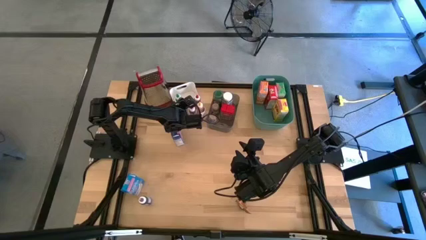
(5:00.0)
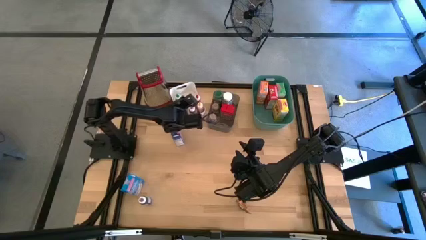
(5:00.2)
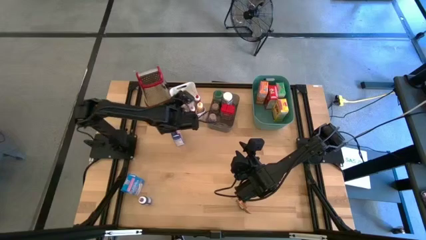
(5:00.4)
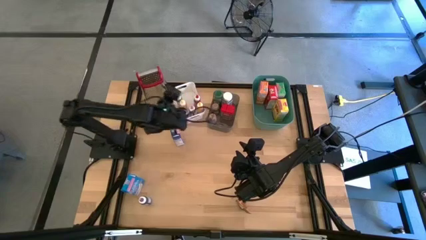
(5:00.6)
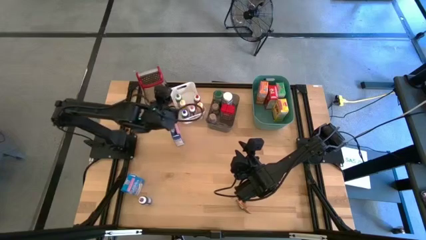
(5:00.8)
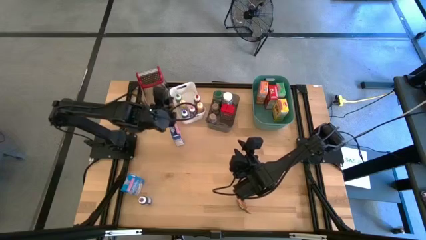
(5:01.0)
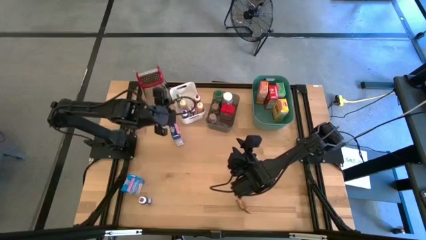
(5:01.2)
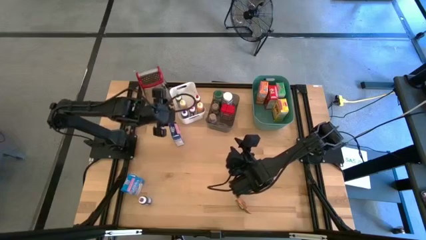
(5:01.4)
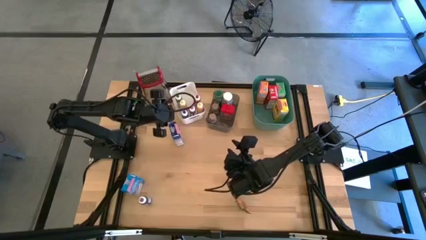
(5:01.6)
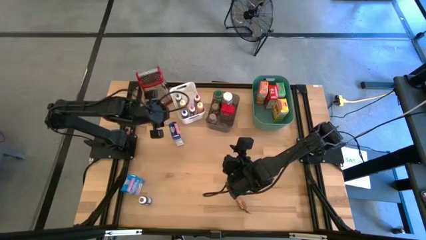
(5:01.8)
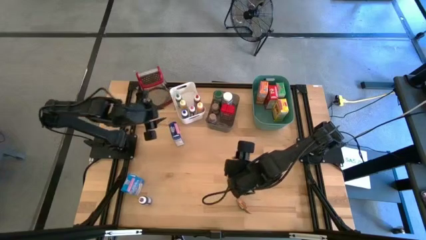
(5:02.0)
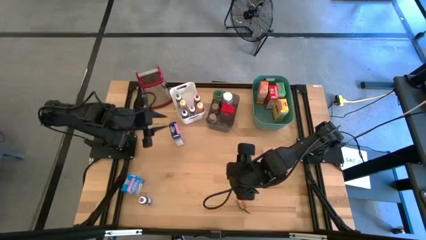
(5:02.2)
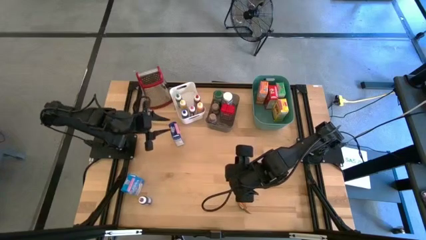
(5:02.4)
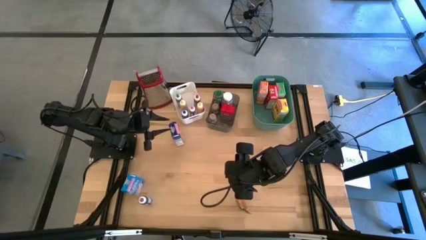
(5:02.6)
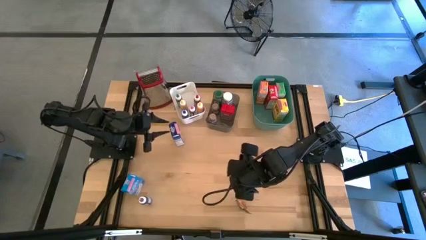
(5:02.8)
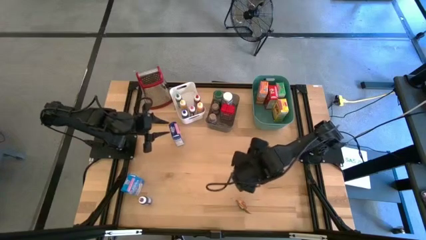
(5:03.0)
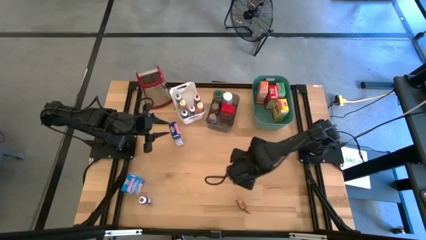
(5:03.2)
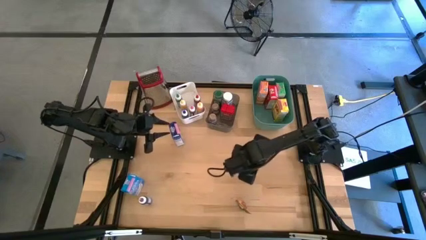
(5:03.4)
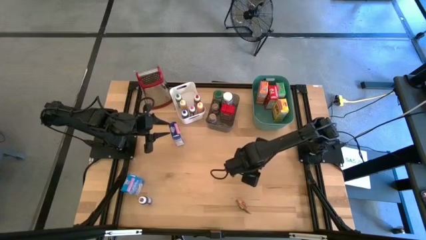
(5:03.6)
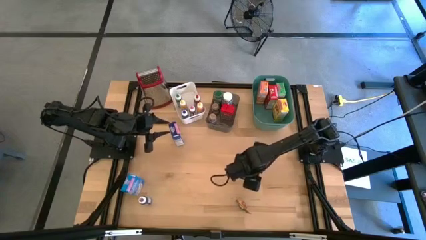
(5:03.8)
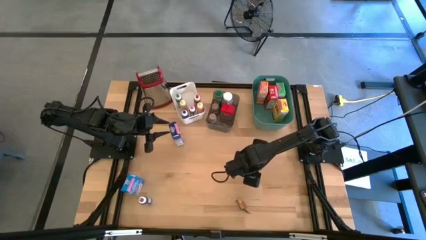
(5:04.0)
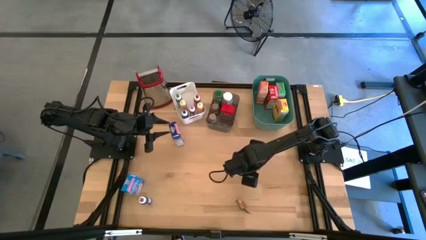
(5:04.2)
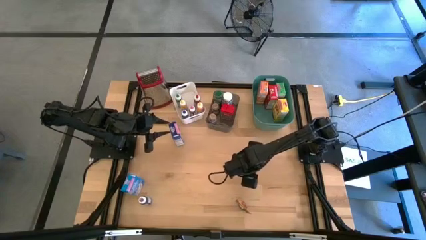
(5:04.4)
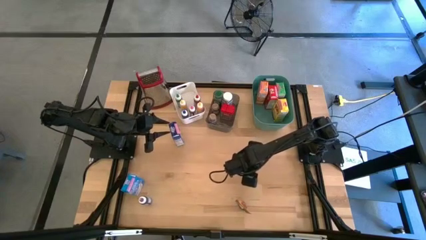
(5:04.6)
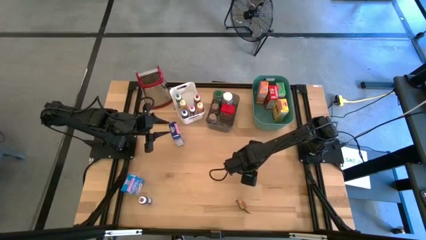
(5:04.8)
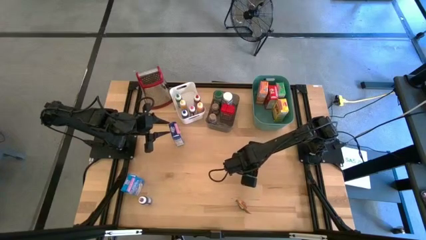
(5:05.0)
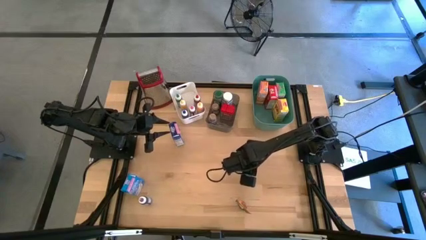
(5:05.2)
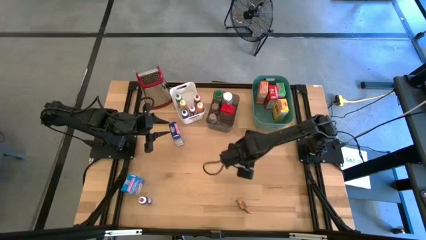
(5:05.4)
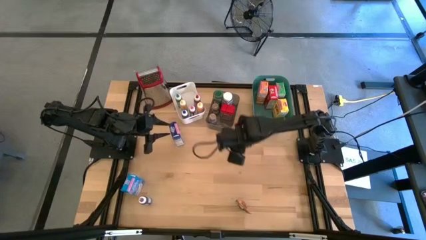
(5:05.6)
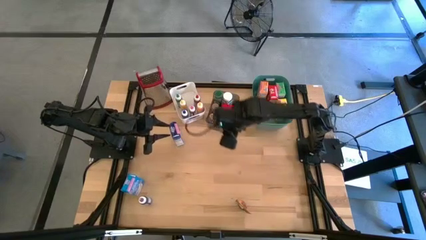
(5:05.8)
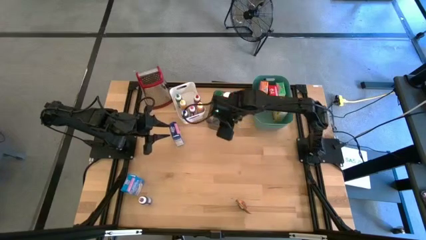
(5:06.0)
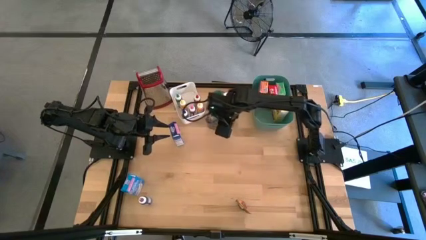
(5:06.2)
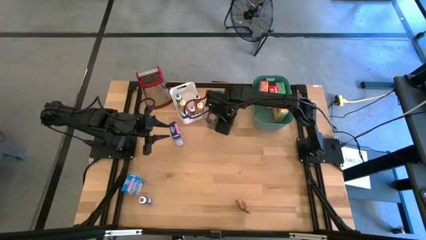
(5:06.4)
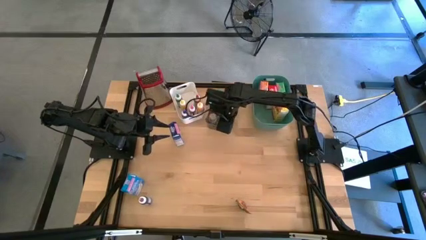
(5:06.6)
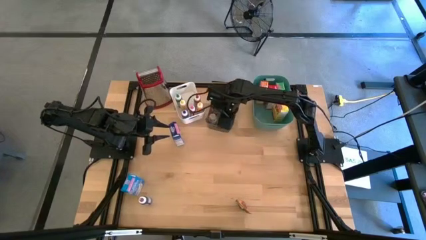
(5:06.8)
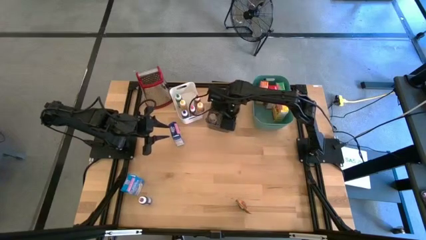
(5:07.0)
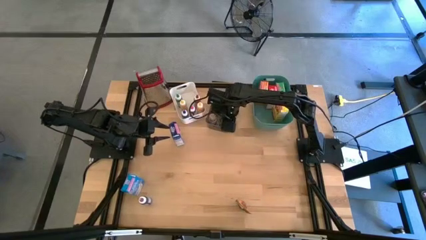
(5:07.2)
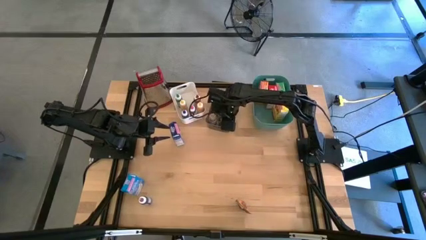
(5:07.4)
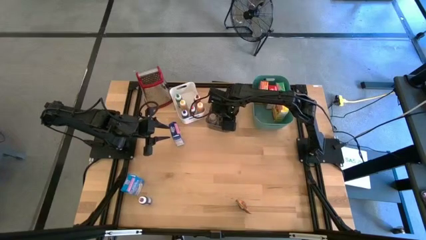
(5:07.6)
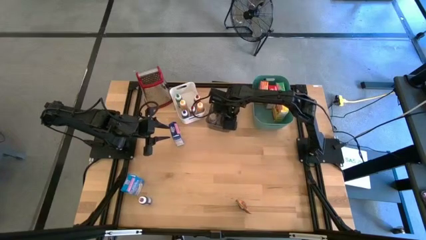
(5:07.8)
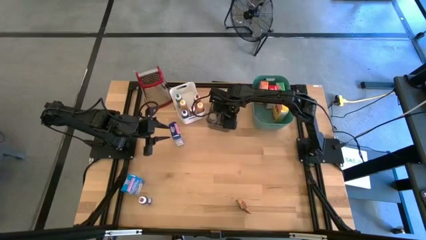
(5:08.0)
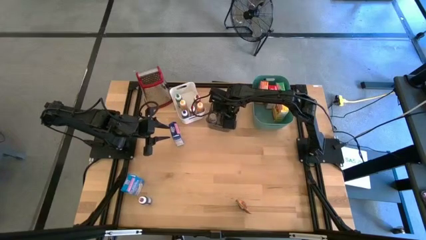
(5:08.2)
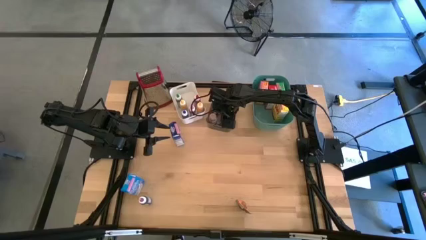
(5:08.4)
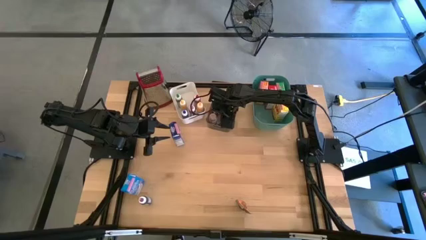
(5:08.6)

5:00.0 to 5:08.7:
Task: Pick & Place Kitchen Items
Put the black spice can into the black bin

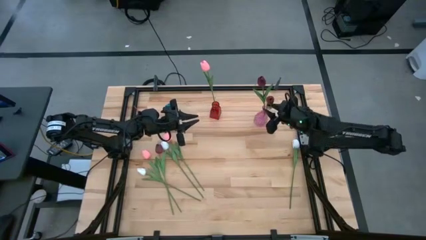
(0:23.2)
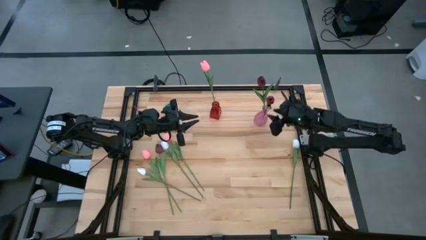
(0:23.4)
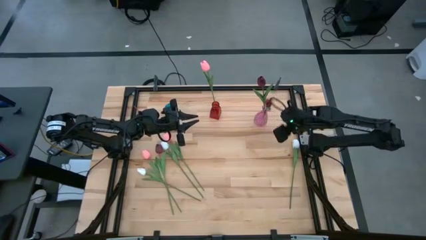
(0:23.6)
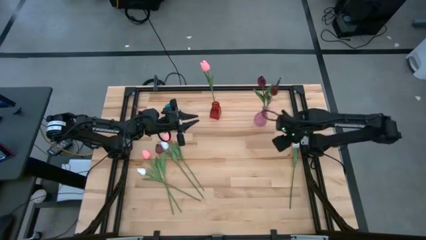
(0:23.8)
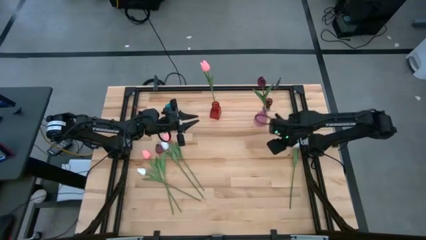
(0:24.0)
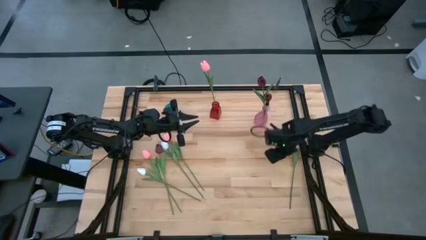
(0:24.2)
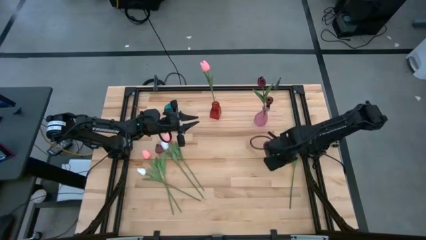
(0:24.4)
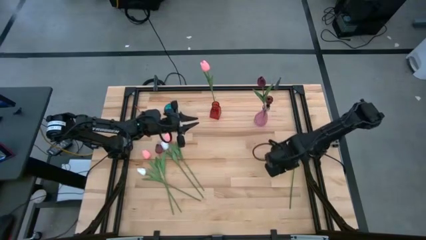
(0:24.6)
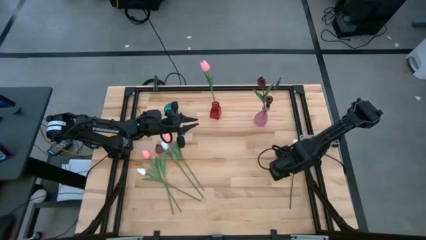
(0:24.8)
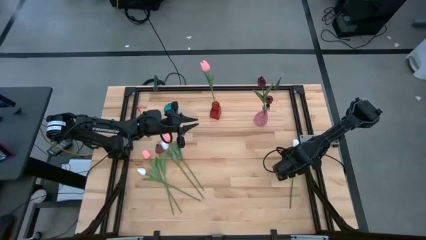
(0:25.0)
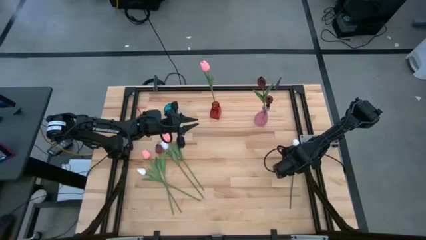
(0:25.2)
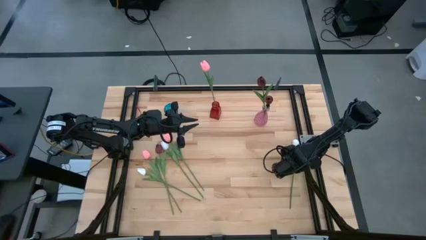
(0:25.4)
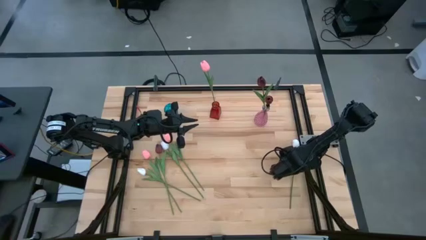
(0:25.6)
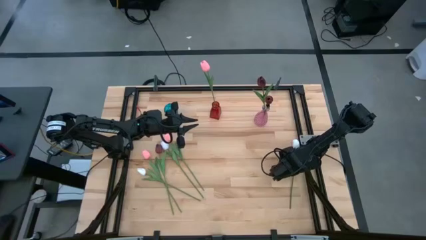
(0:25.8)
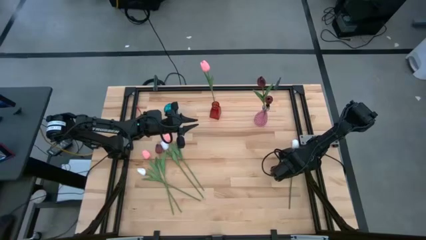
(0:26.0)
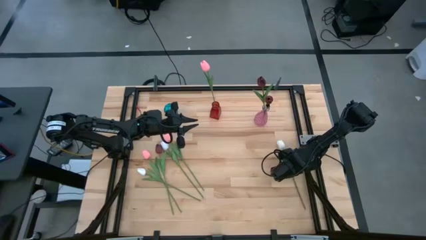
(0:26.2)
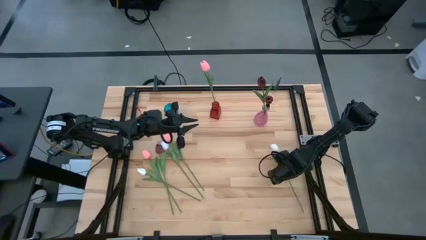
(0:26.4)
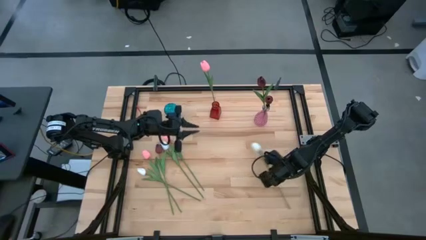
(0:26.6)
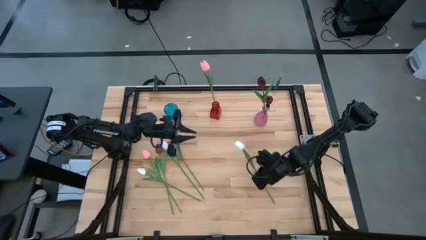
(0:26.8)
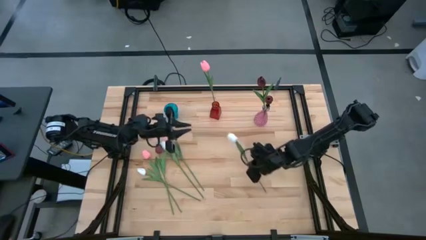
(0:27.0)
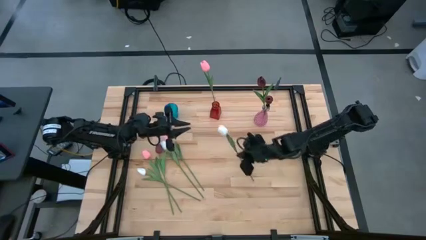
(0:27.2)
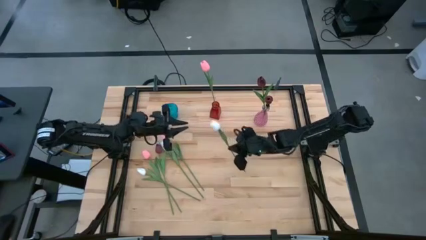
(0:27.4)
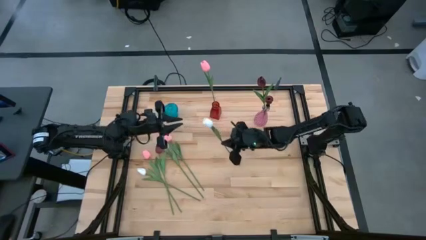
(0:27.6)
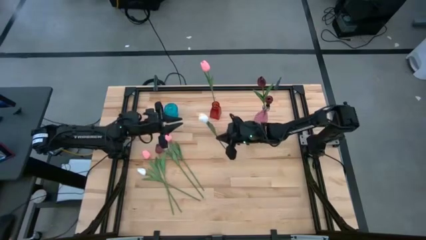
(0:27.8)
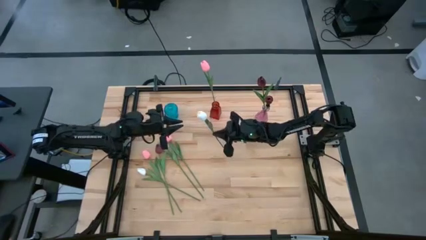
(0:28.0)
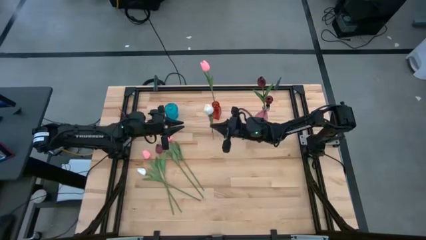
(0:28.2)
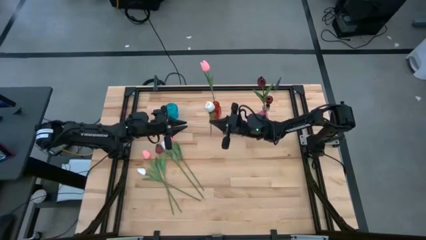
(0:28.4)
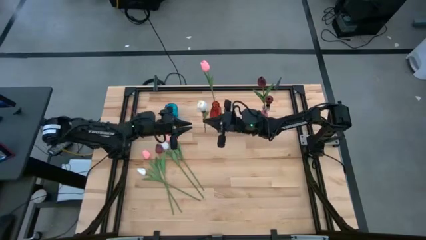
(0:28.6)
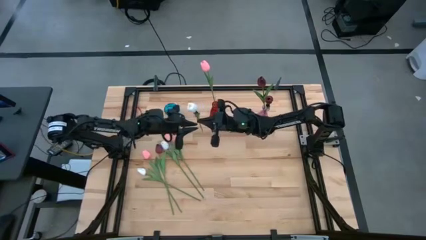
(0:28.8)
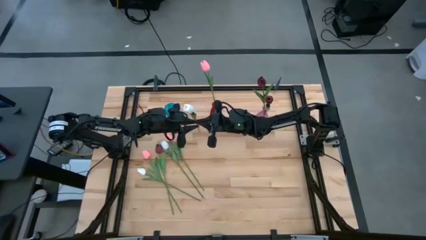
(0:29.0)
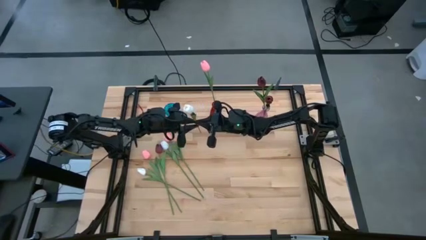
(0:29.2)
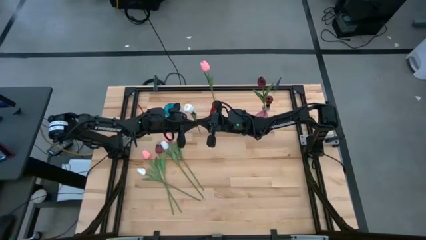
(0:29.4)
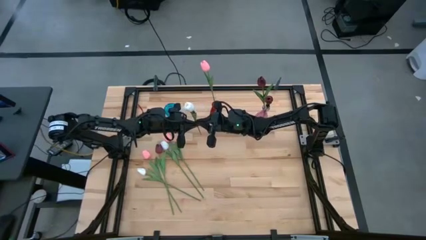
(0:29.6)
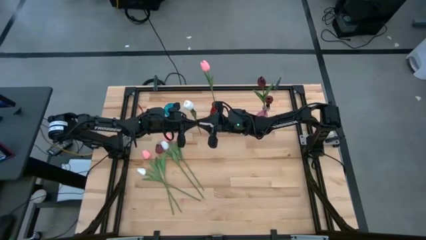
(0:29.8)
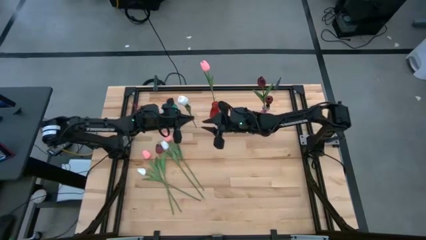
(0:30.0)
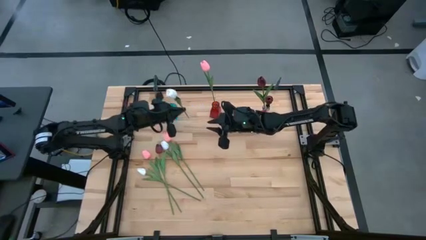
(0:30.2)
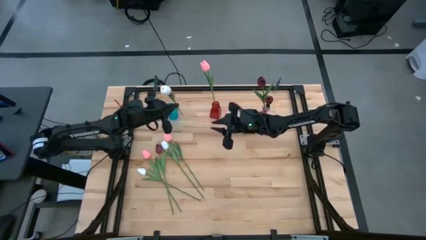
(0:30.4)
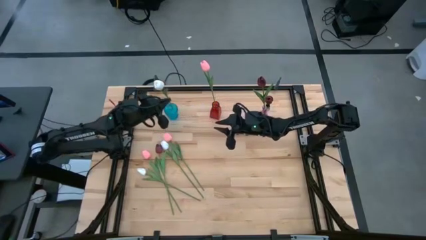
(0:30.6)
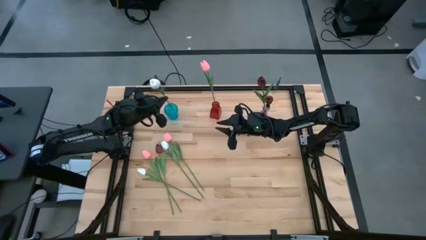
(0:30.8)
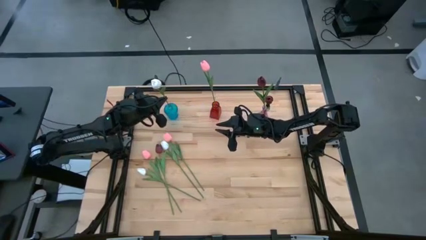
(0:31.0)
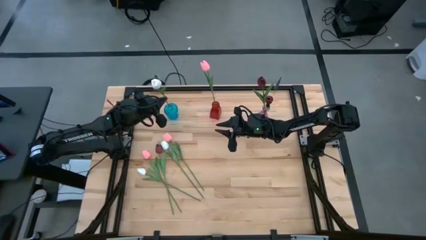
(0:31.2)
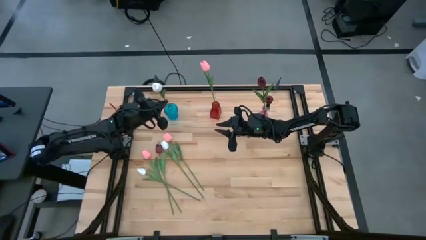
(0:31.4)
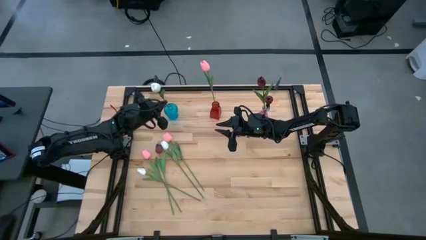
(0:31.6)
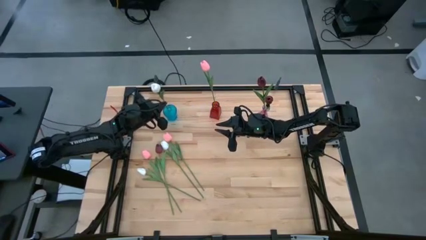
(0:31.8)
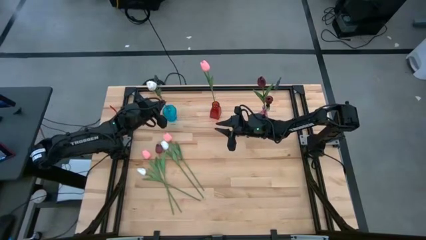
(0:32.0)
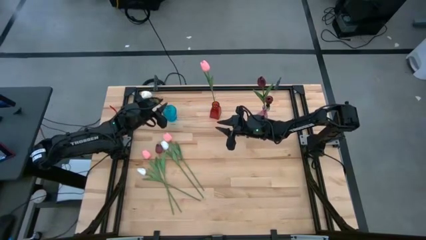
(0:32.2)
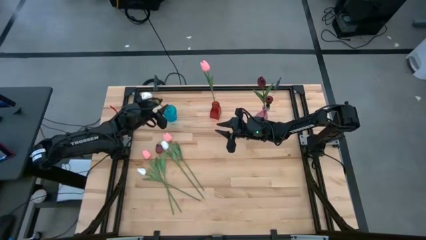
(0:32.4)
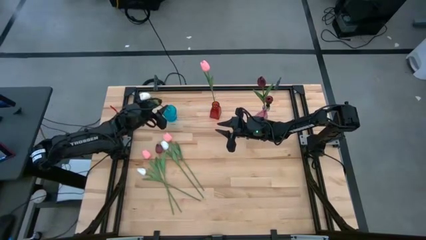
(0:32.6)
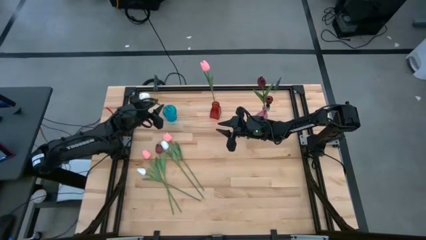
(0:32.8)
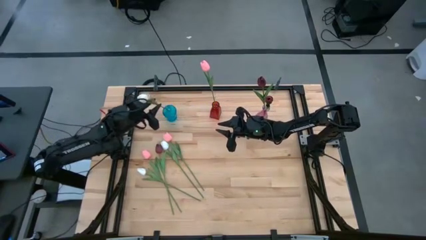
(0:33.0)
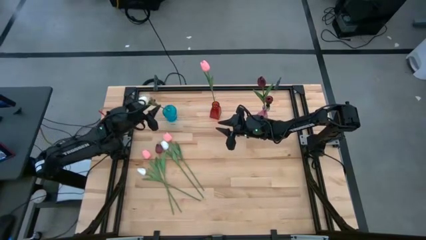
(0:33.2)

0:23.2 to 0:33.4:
Task: Sort flowers into vase by color
Put the right white flower into the blue vase
